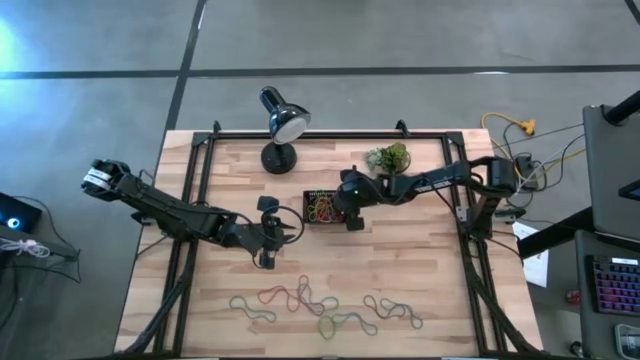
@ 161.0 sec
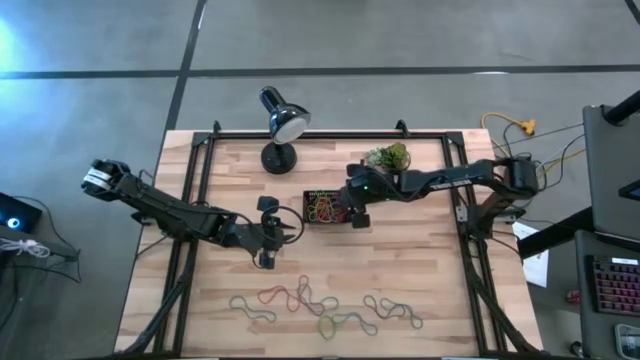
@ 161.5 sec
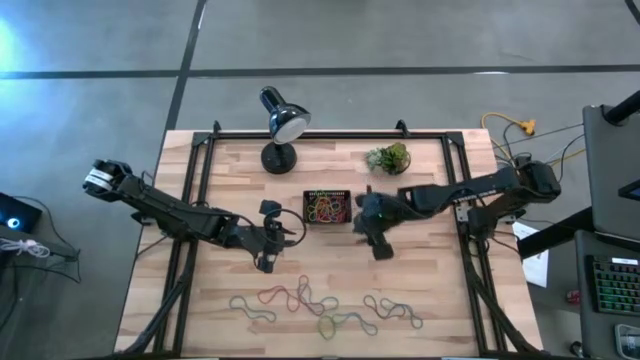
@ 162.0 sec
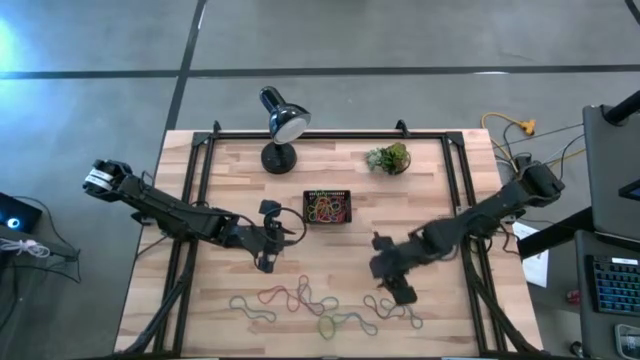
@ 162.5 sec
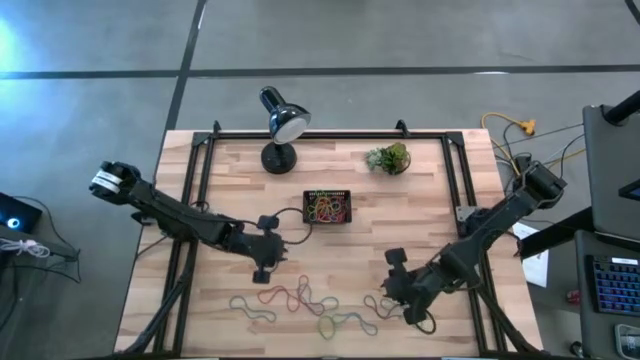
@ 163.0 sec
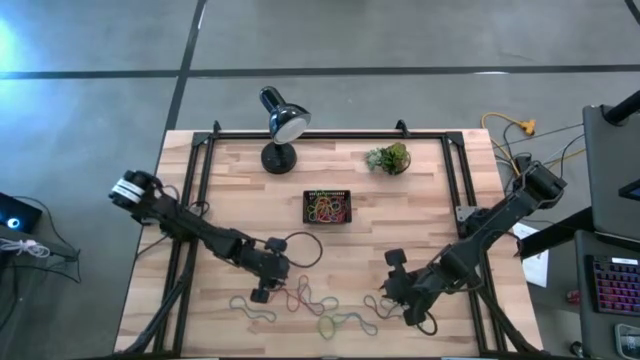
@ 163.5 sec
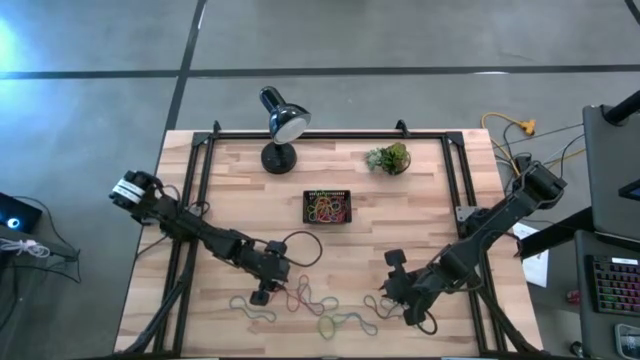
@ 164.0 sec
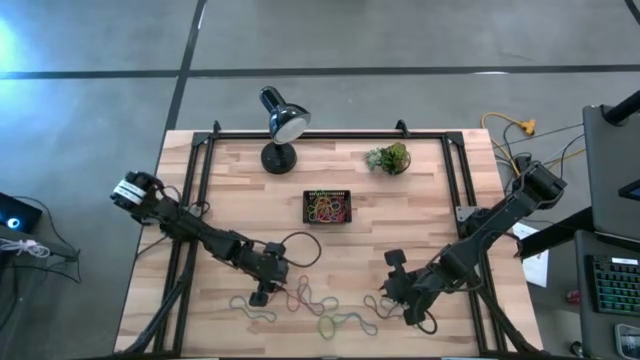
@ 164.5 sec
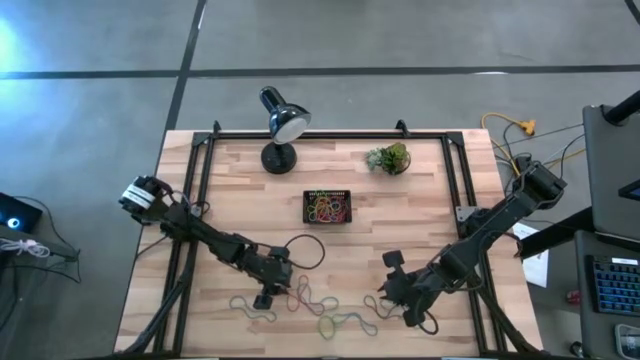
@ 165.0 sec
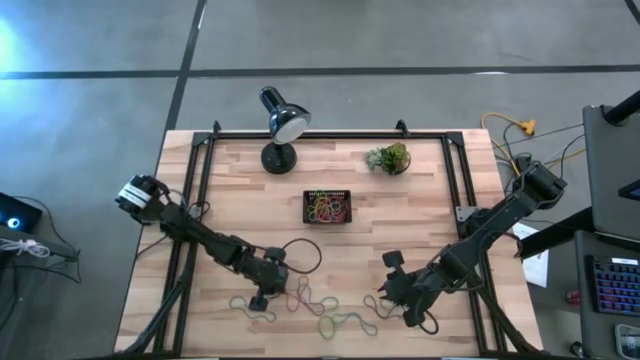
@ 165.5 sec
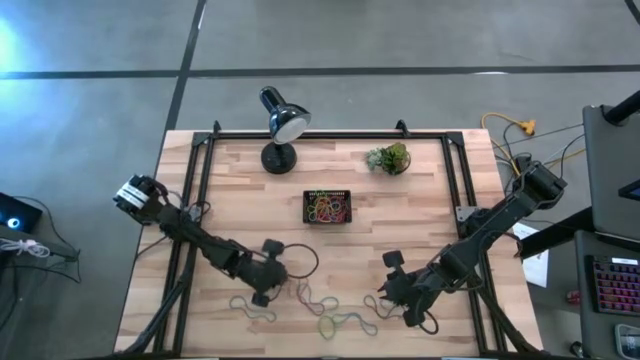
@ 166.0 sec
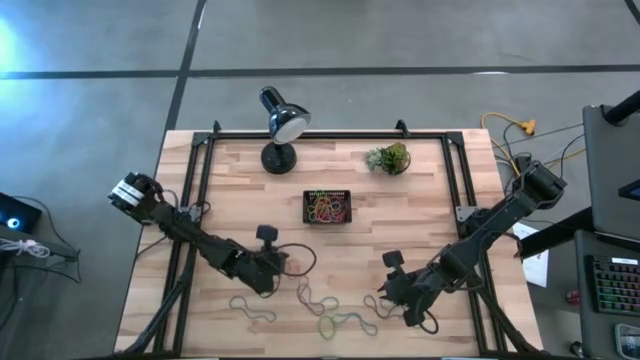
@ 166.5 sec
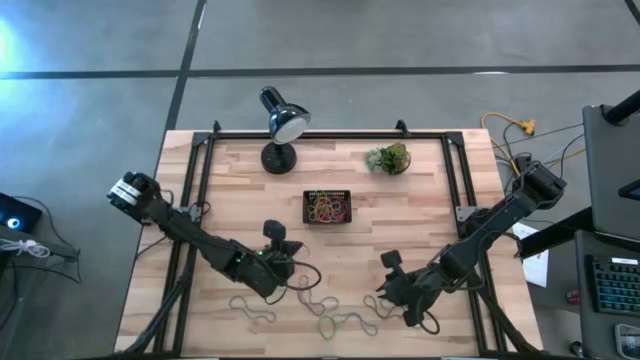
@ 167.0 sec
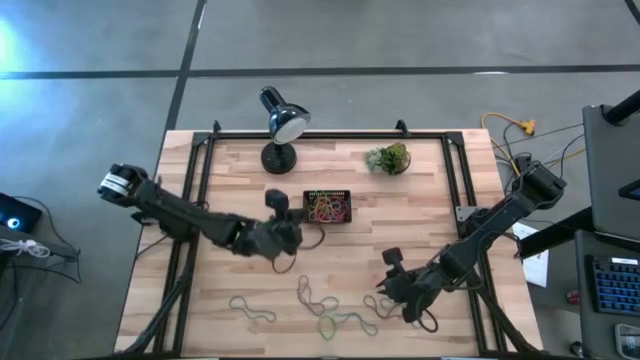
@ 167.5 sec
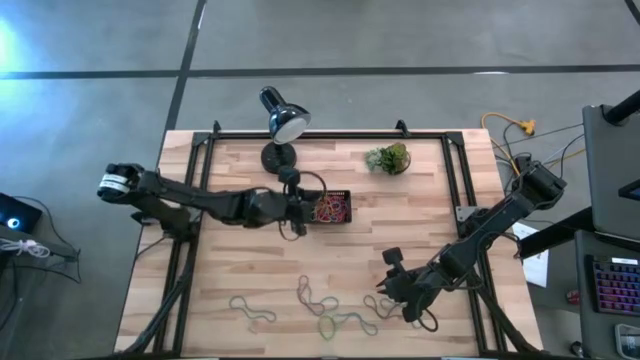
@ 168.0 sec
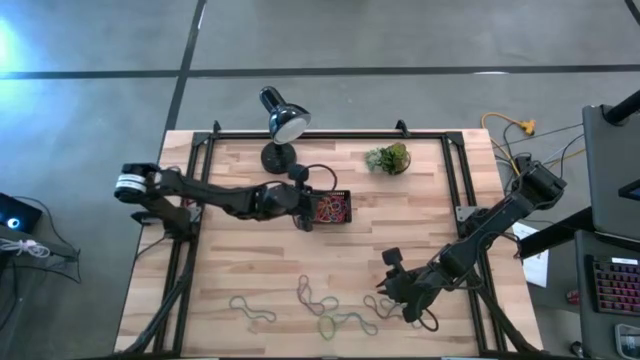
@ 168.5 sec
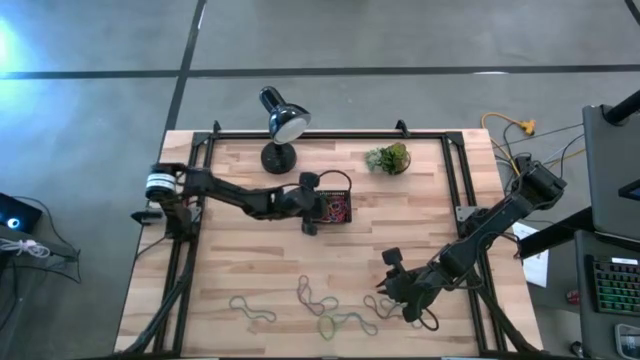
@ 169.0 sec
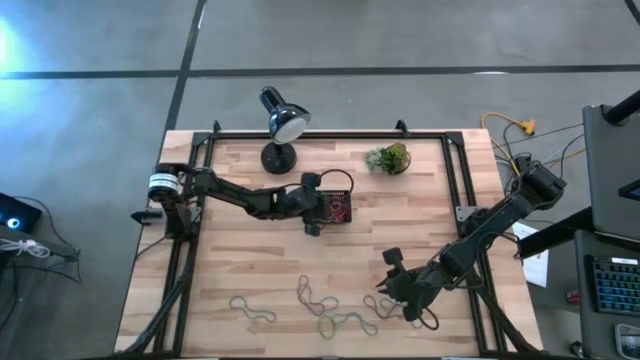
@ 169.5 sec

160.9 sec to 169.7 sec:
Task: Pick and place rubber bands into bin
Put the red rubber band into the black bin

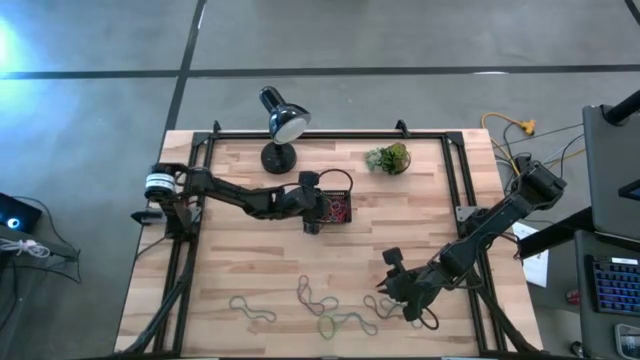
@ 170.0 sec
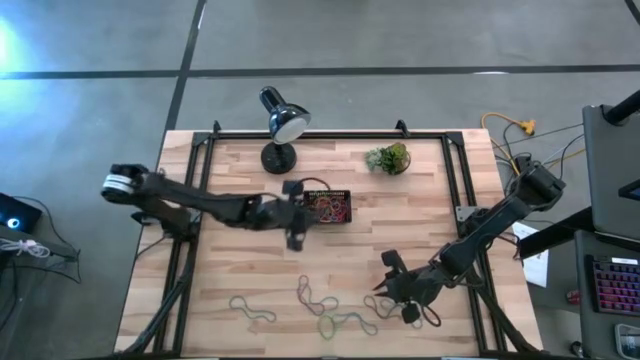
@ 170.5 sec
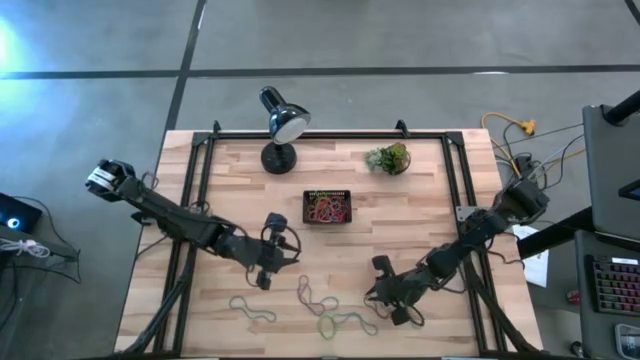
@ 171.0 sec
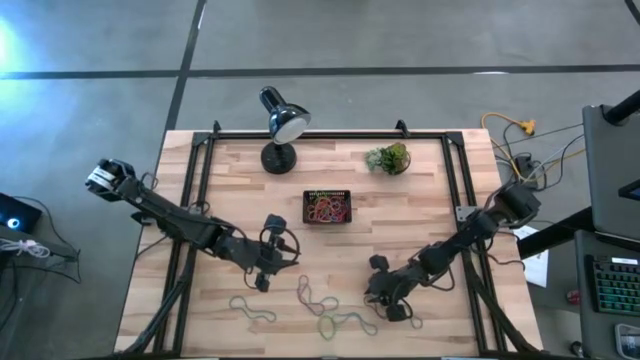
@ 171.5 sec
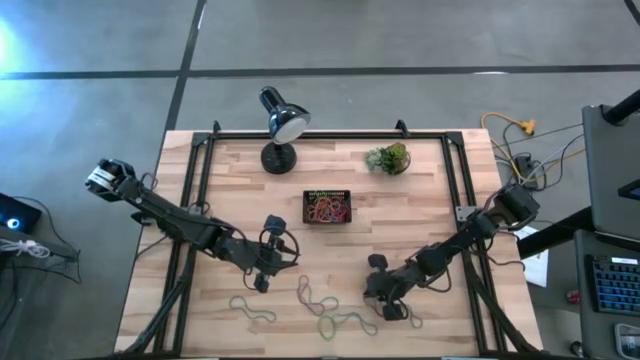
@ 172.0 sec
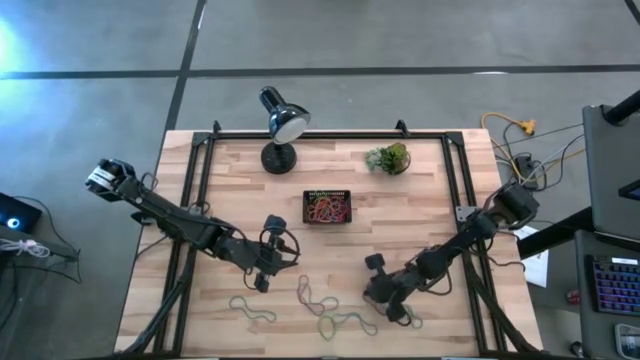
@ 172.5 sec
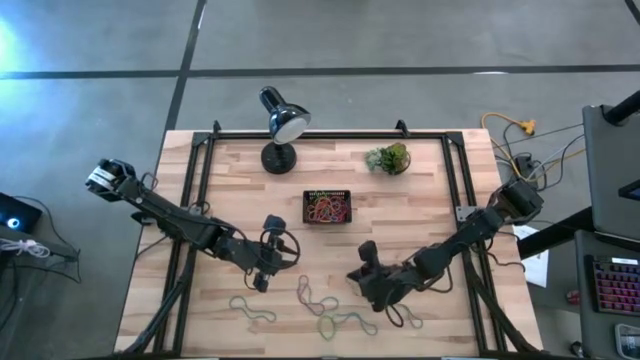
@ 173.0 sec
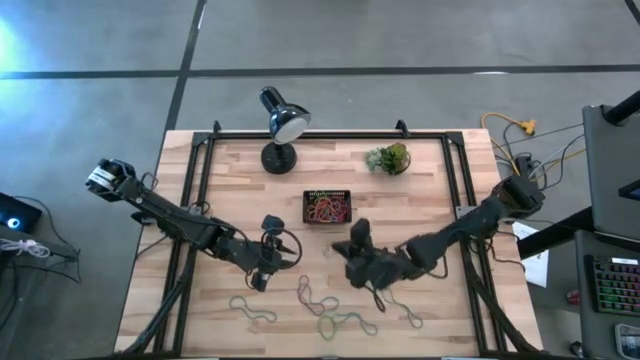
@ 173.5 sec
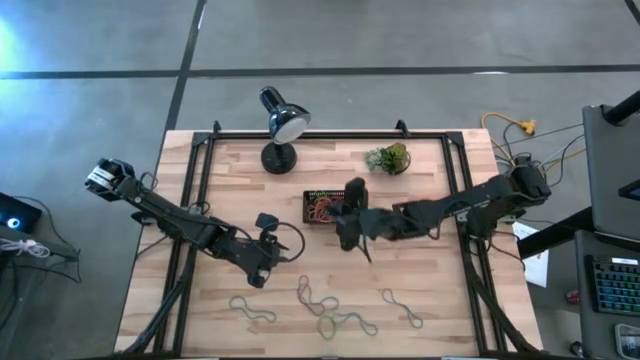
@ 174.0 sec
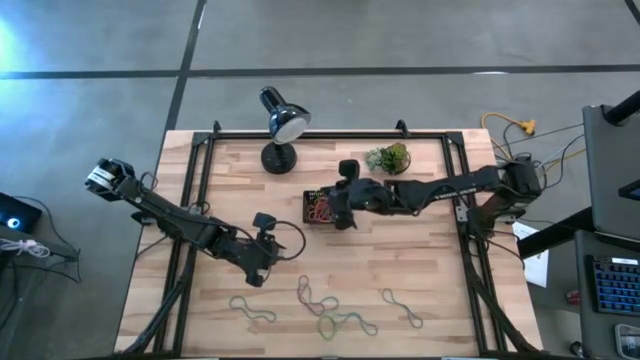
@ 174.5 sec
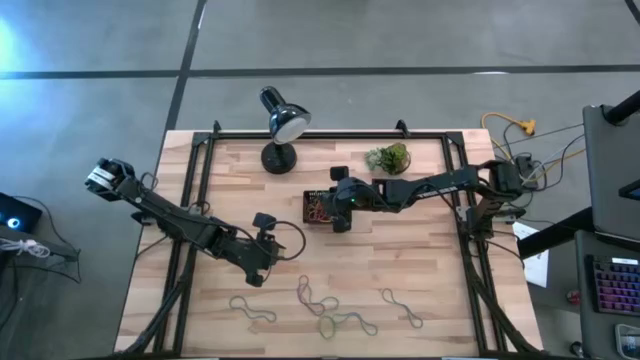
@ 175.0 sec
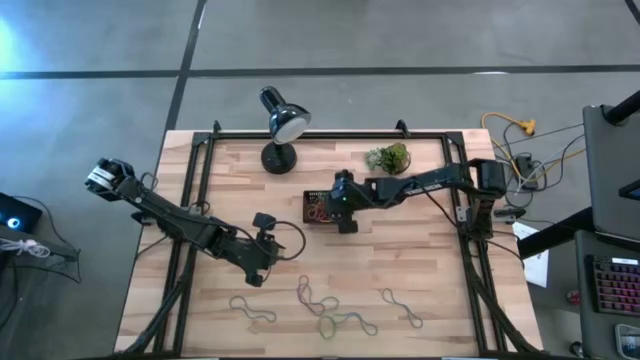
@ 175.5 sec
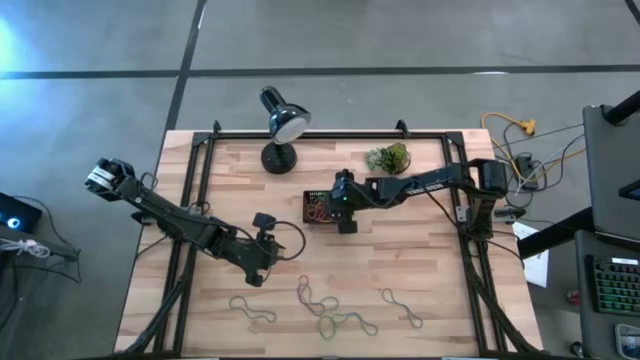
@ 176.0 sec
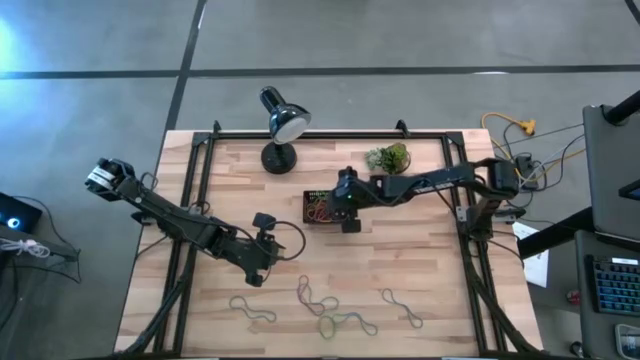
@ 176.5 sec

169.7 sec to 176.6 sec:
Put the purple rubber band into the black bin

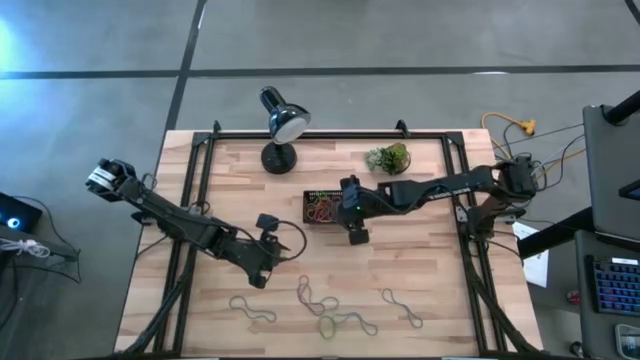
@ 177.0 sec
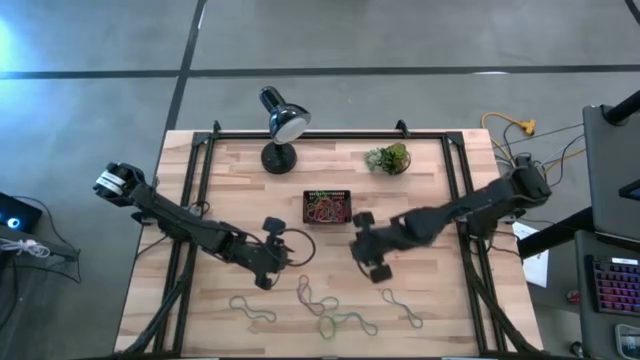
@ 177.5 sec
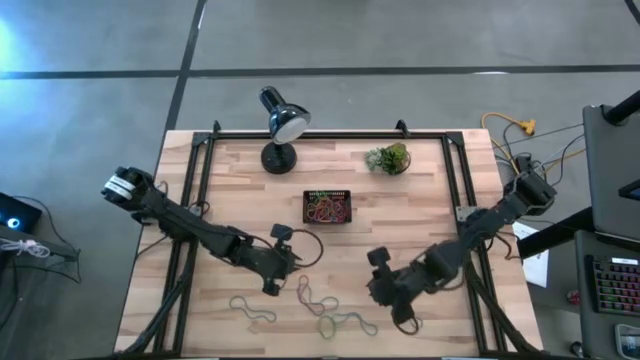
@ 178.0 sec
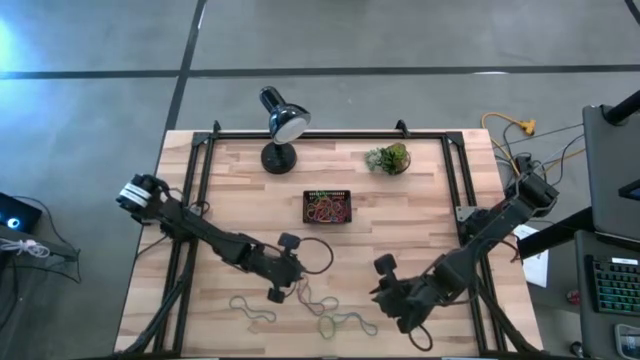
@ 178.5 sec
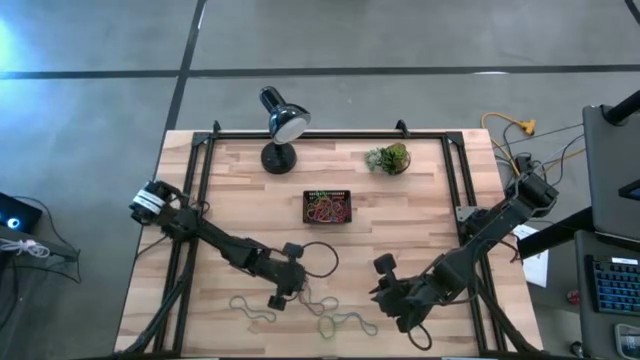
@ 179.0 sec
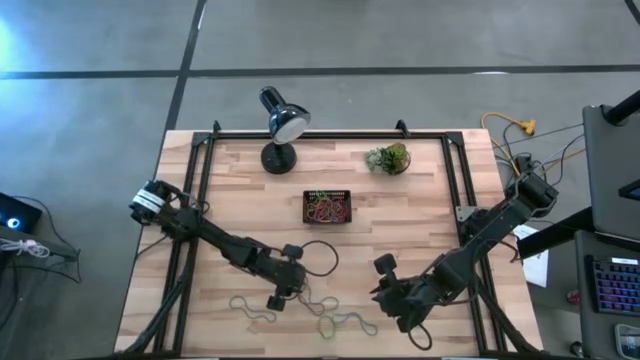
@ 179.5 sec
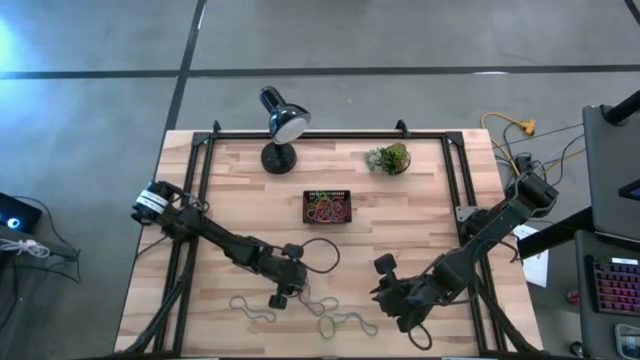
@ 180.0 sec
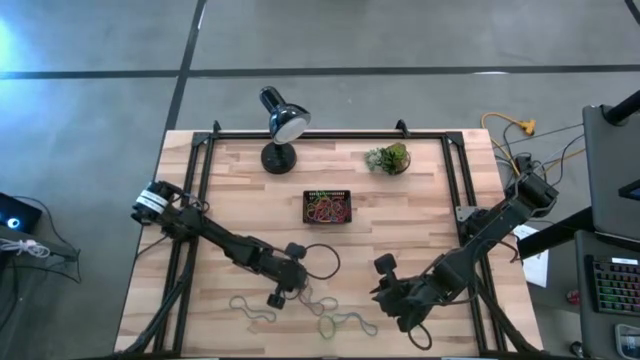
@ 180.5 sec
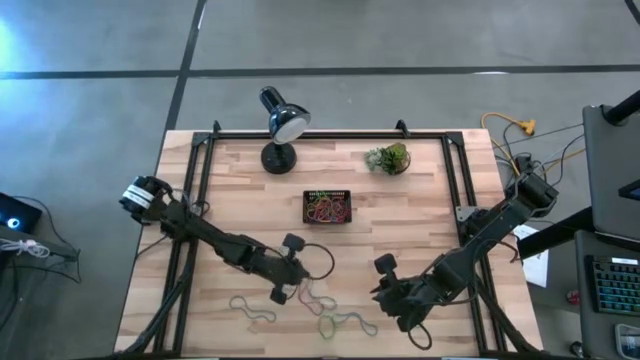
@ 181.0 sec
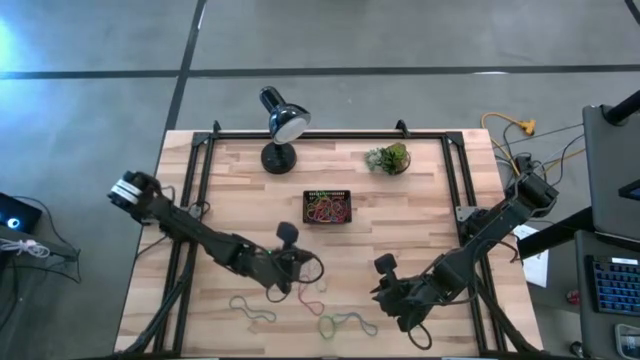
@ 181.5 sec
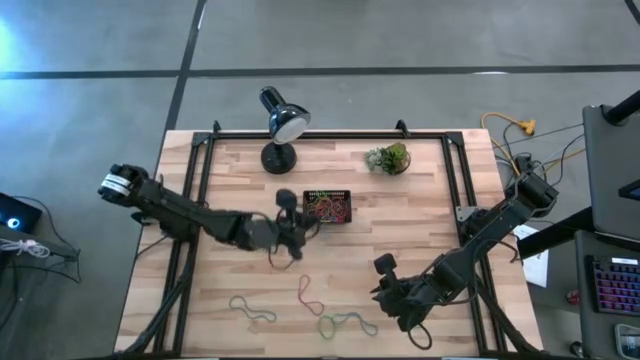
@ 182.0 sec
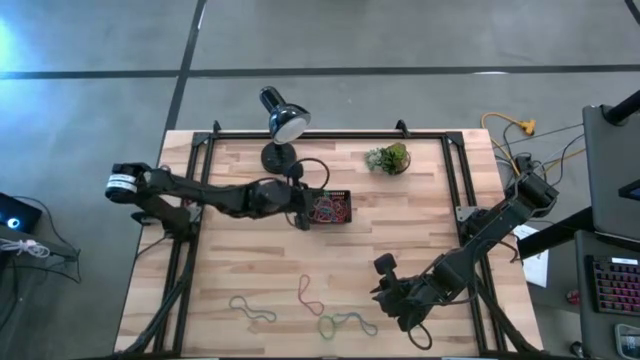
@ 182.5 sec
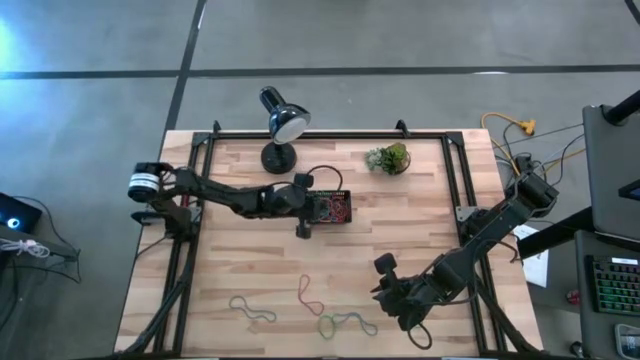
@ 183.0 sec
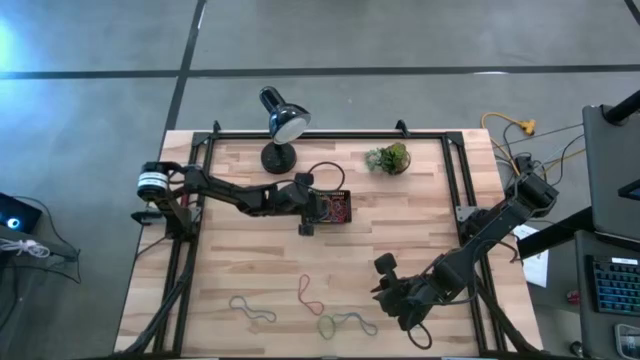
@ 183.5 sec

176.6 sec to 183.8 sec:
Put the blue rubber band into the black bin
